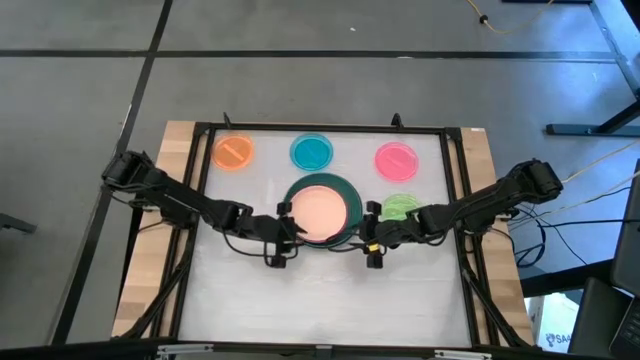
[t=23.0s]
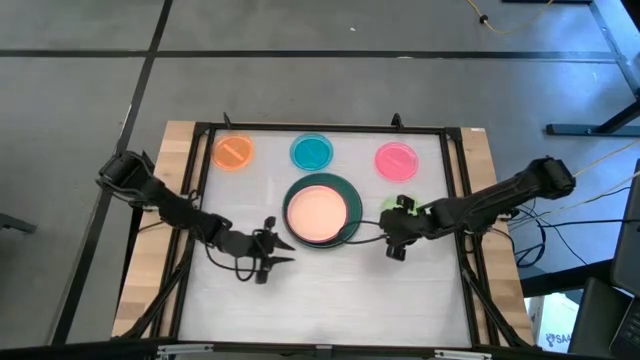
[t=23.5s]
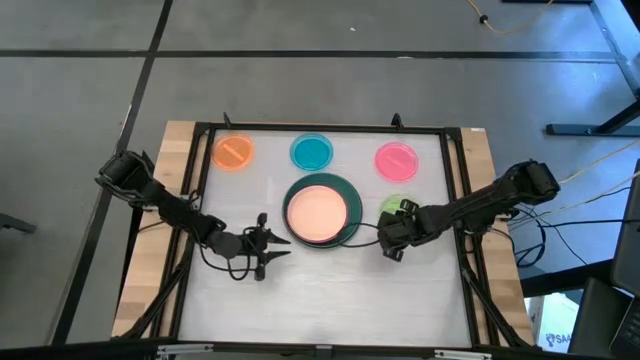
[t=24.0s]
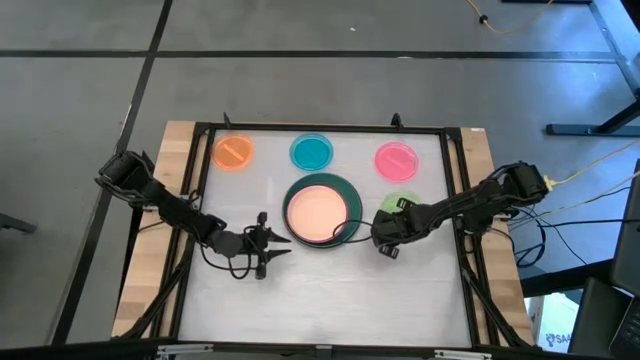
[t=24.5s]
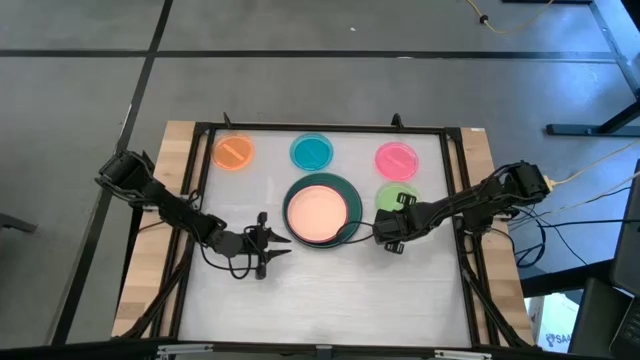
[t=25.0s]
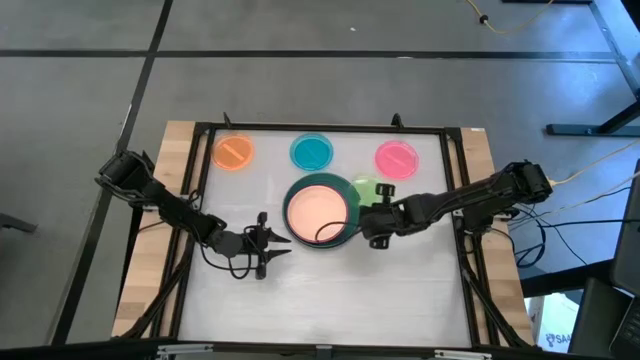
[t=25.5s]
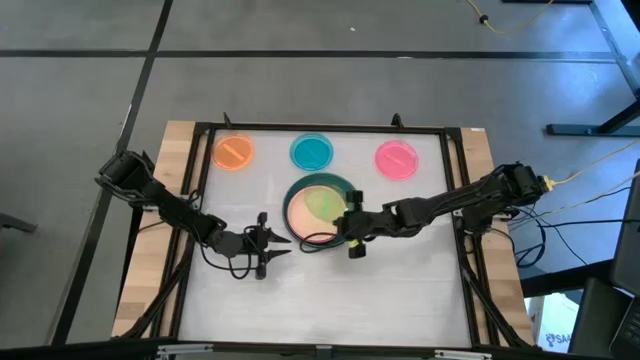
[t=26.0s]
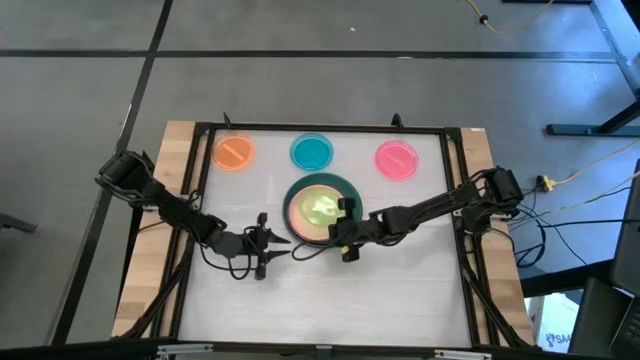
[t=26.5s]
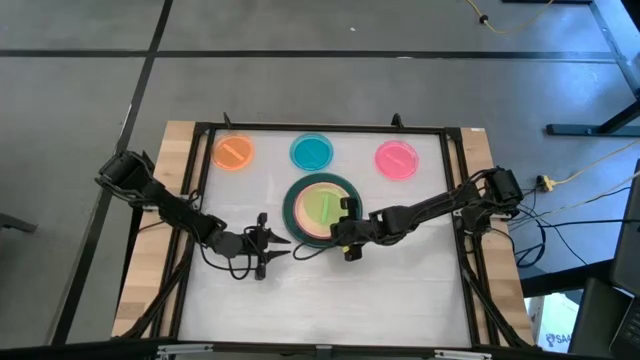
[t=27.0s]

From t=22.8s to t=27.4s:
Task: Stack plastic plates
Stack the light green plate on top of the beige plate

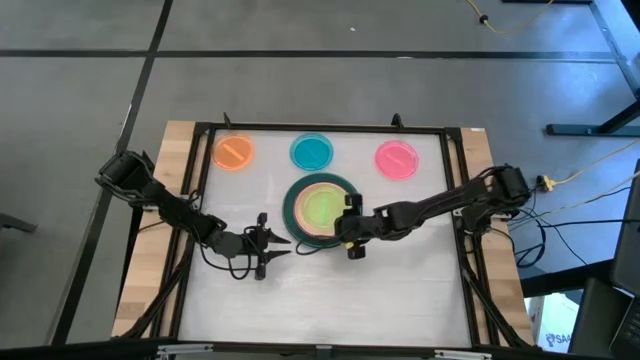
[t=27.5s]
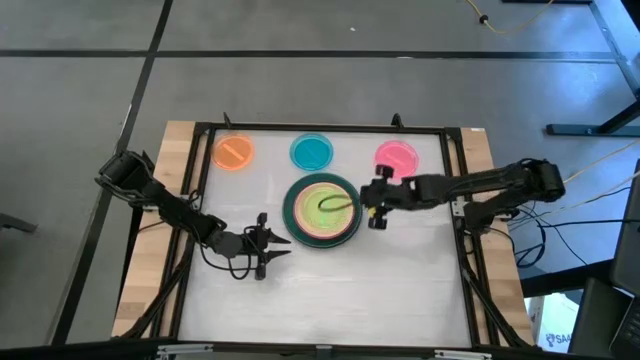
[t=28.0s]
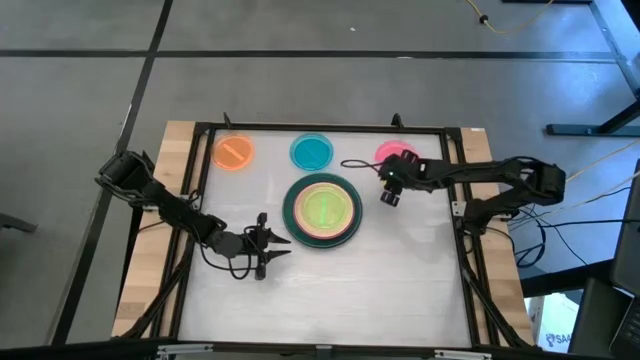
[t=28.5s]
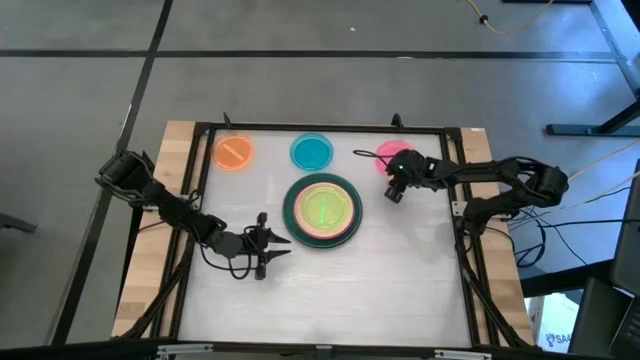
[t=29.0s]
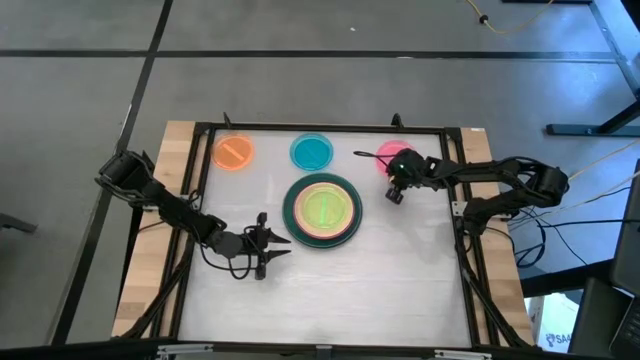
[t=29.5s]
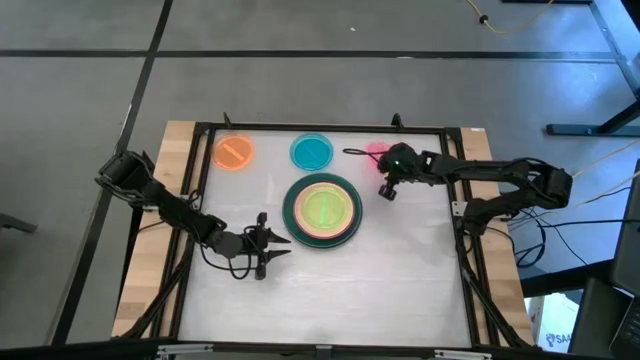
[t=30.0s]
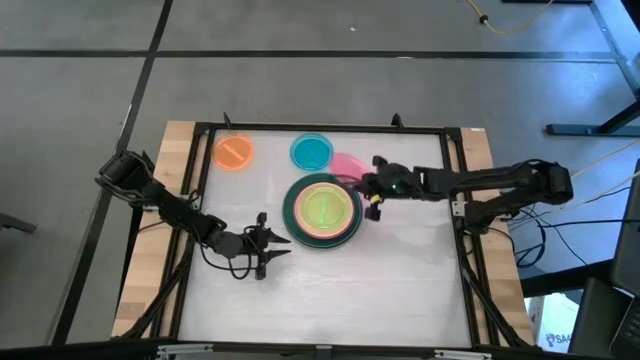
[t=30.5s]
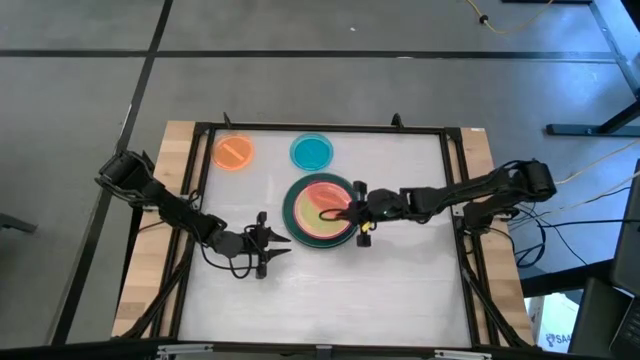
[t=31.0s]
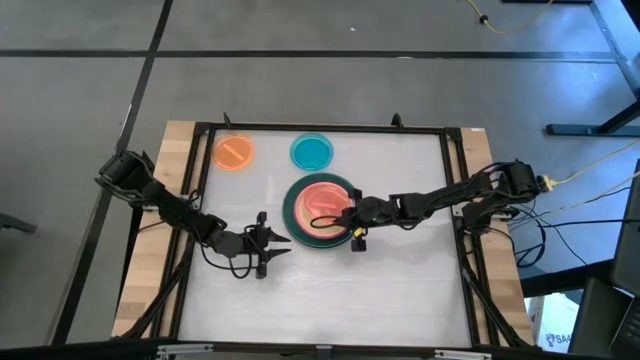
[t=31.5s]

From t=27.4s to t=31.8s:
Stack the light pink plate on top of the light green plate

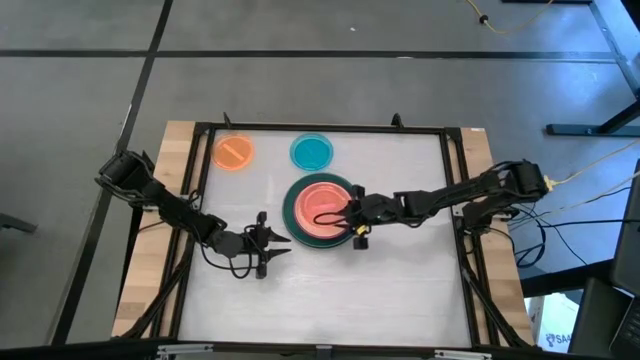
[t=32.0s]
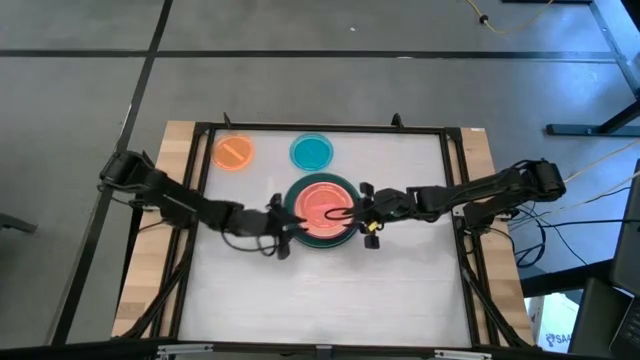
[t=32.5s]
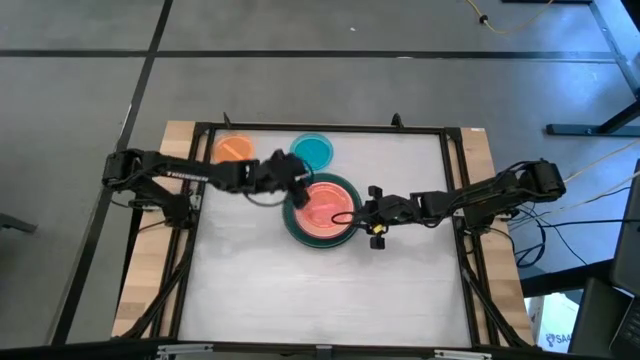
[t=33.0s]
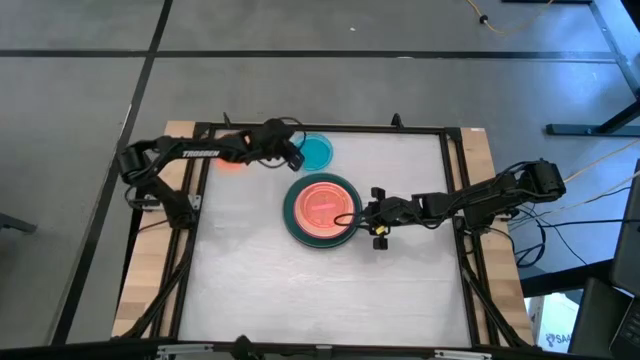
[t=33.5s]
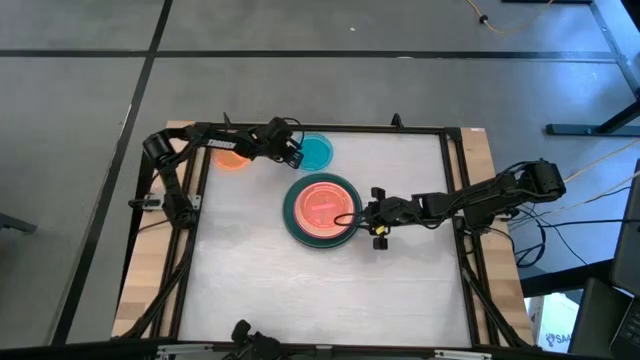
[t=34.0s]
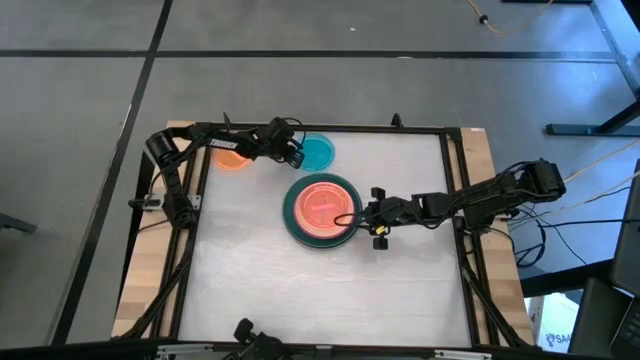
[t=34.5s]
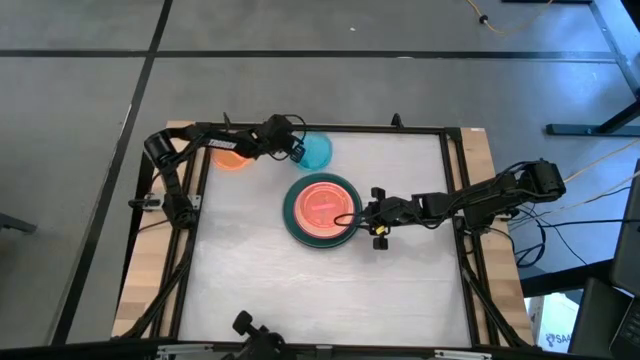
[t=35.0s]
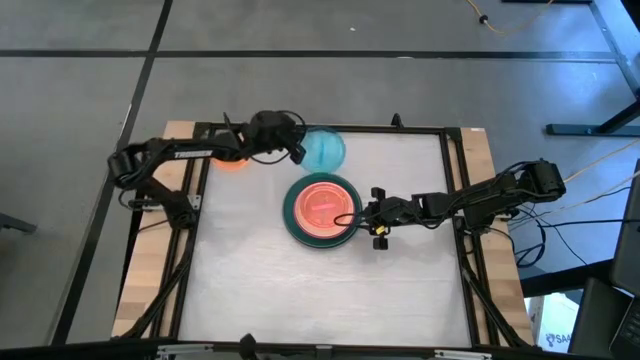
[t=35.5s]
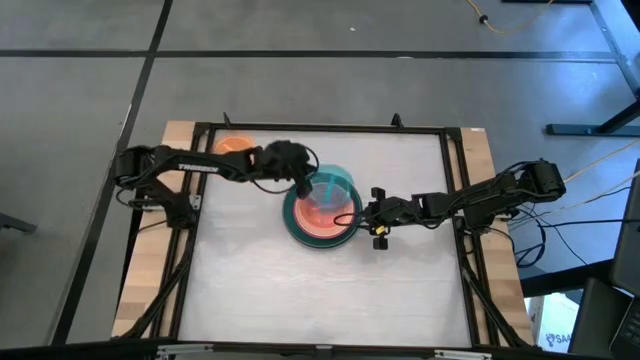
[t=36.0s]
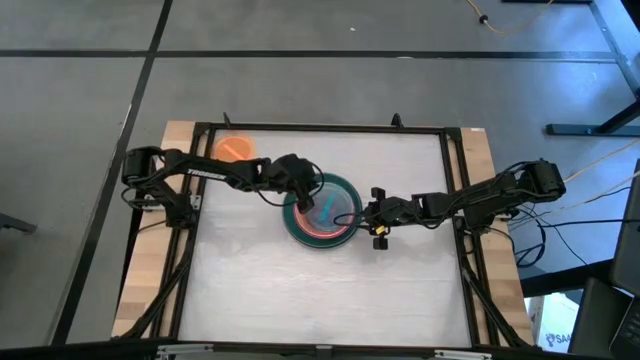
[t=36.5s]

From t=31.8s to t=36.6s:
Stack the light blue plate on top of the light pink plate

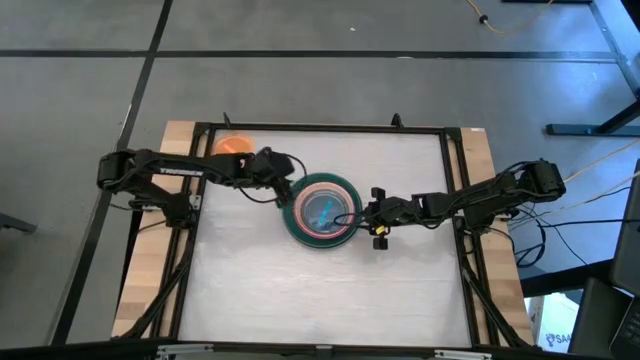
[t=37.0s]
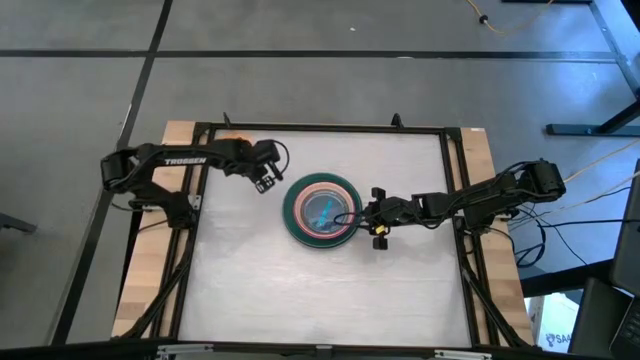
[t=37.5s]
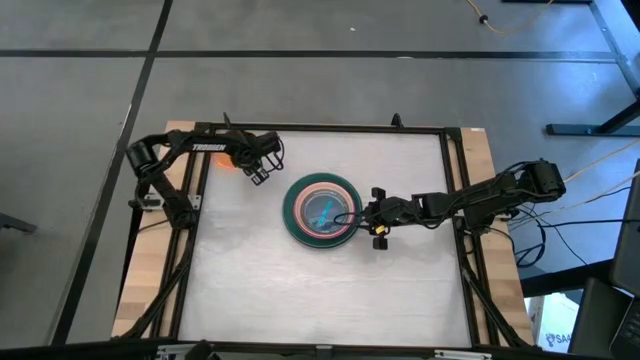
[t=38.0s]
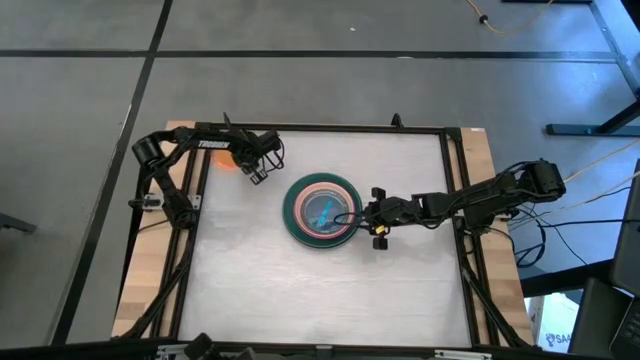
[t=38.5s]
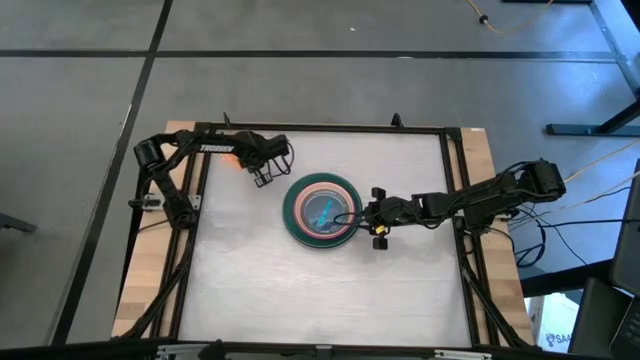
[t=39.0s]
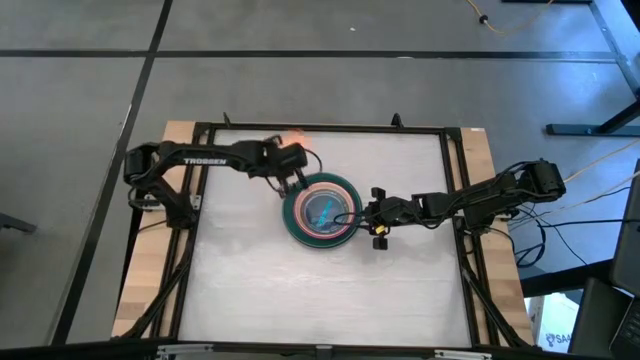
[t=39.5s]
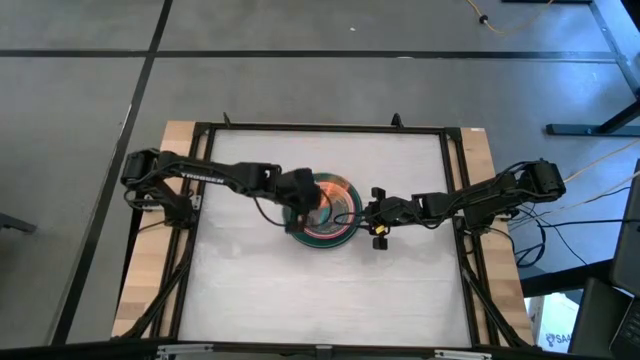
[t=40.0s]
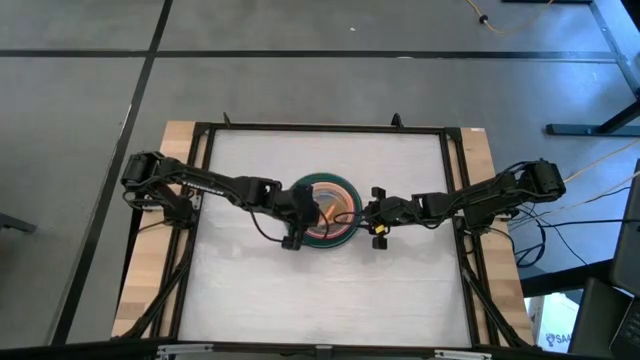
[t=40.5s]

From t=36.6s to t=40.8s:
Stack the light orange plate on top of the light blue plate

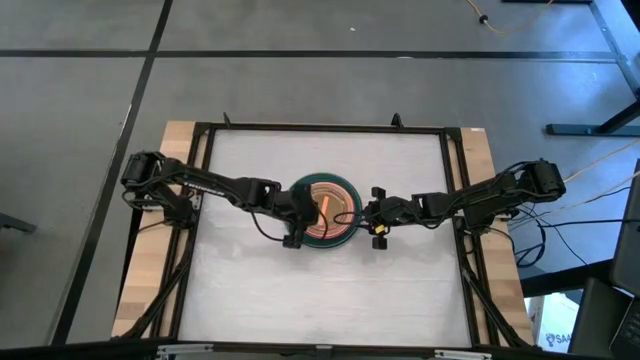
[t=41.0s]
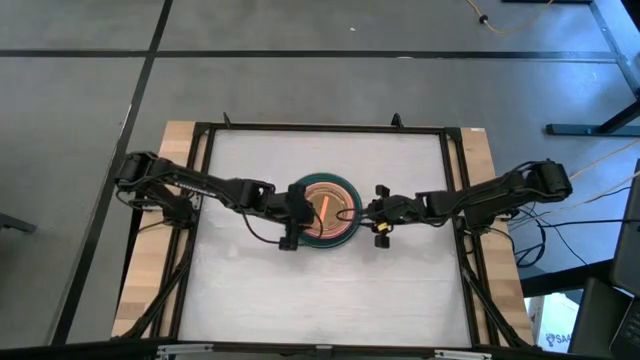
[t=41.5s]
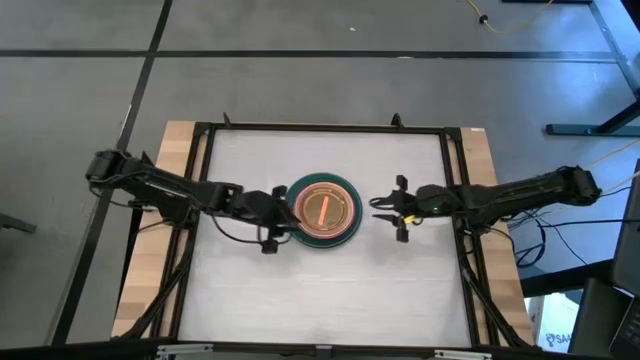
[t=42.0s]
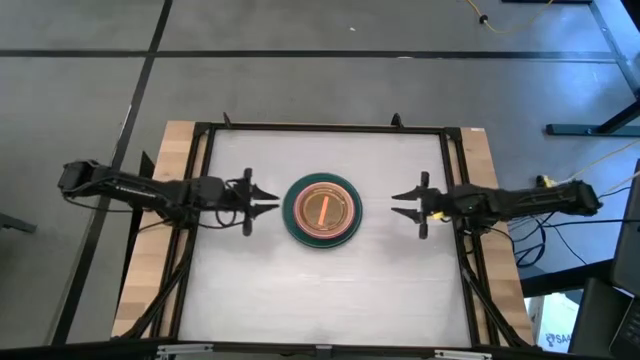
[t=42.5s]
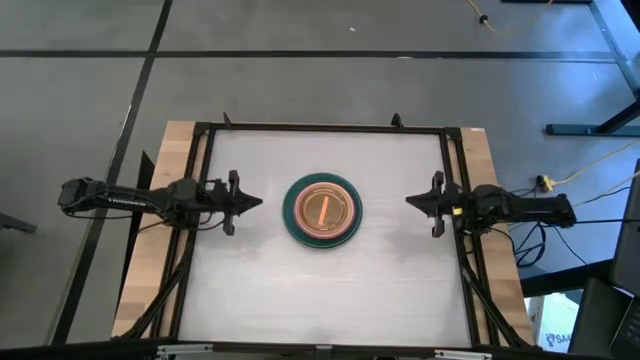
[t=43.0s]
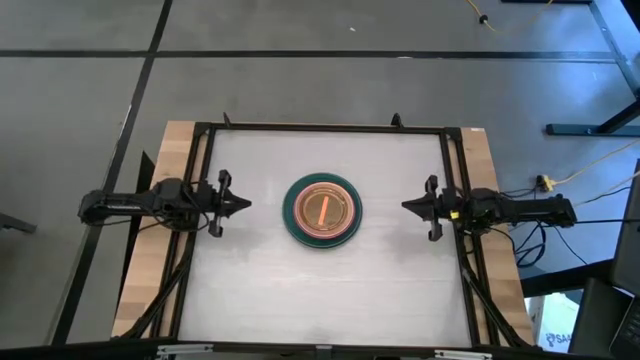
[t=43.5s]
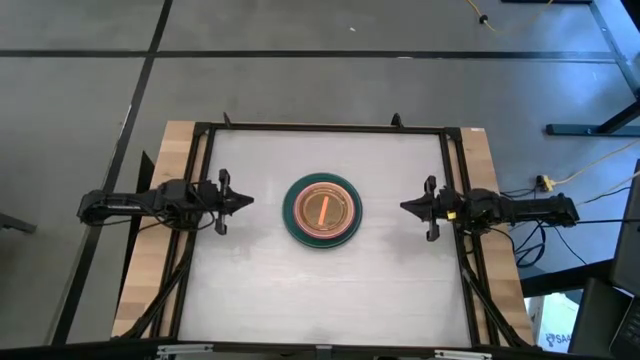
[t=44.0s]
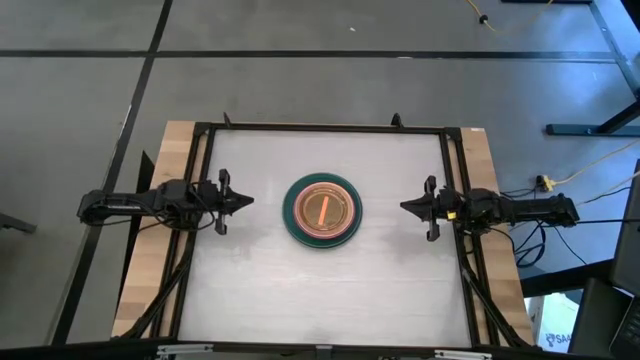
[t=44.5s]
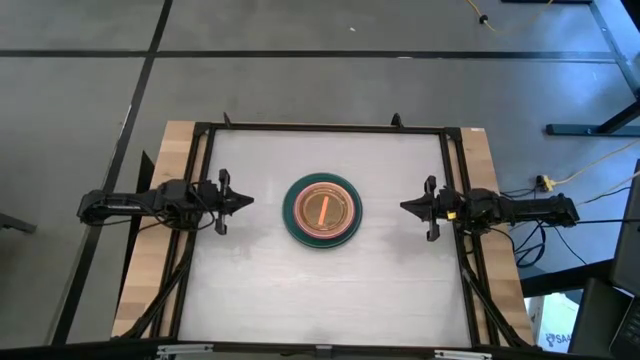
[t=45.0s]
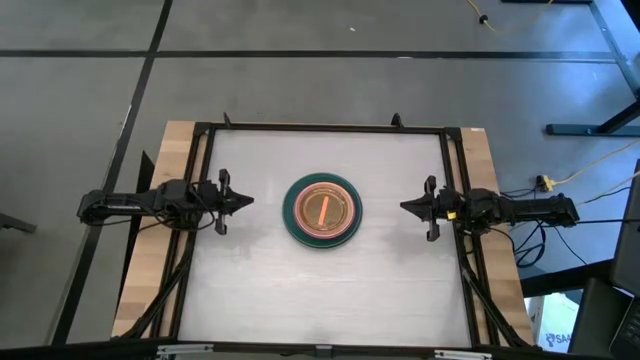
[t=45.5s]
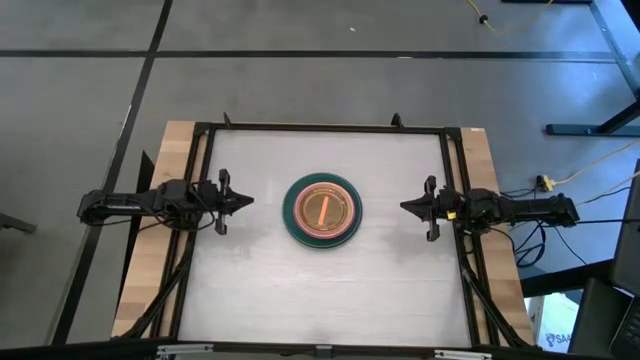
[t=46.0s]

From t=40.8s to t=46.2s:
Return to Home Position
